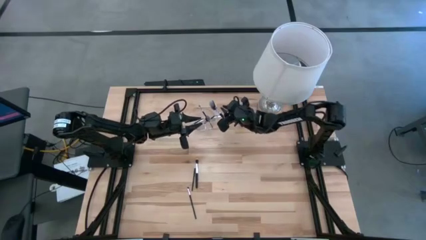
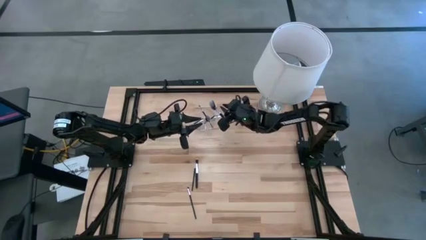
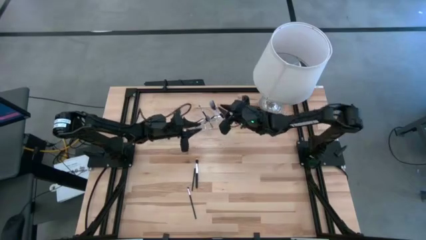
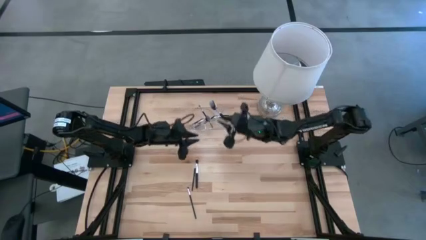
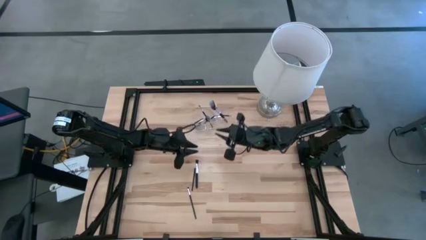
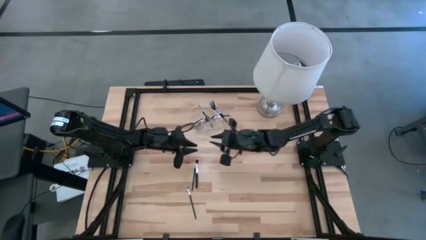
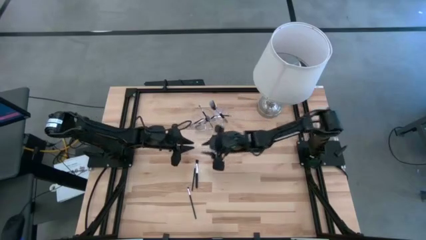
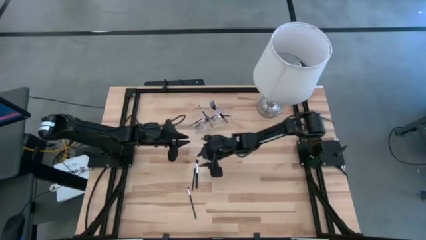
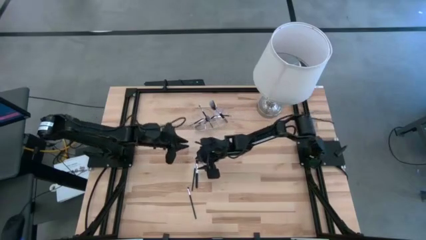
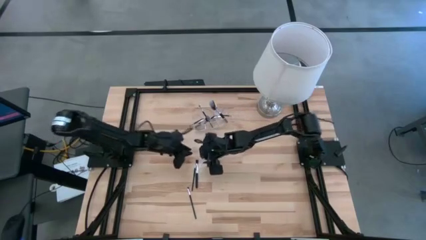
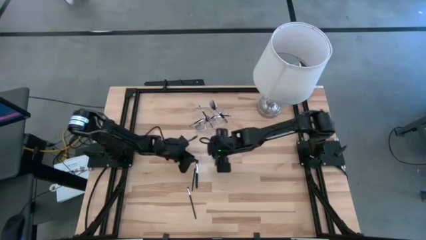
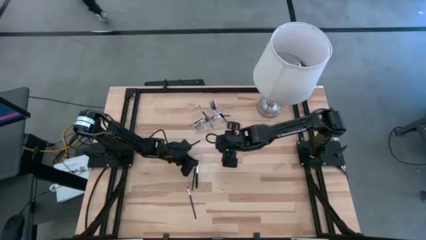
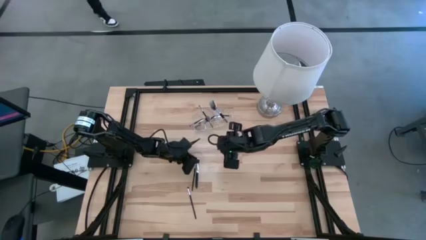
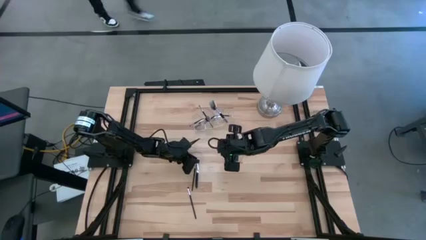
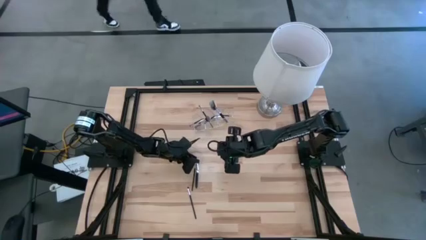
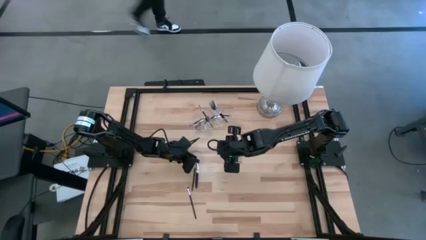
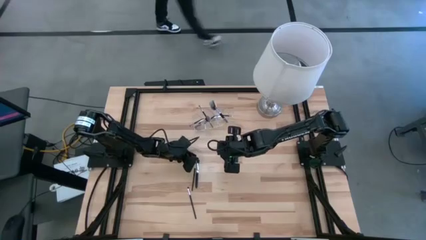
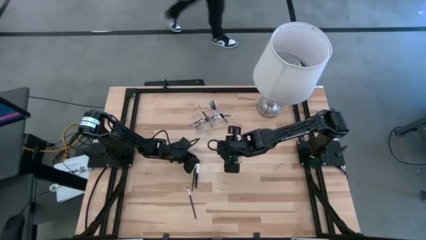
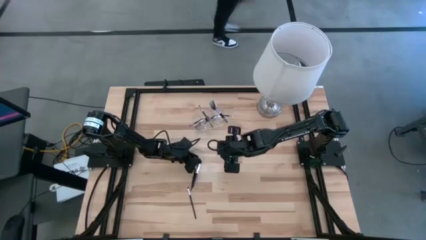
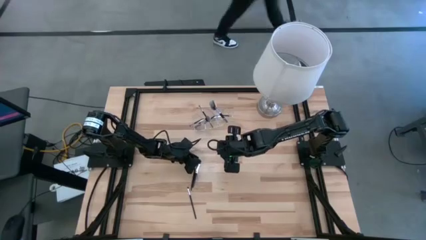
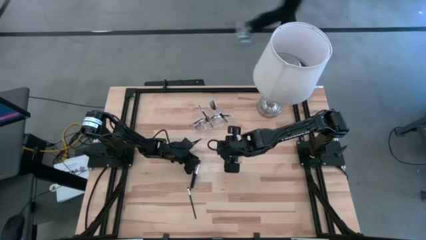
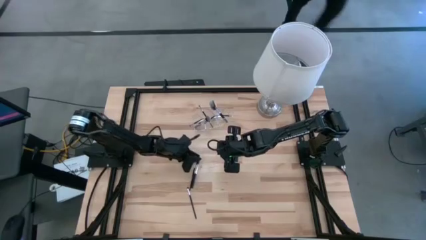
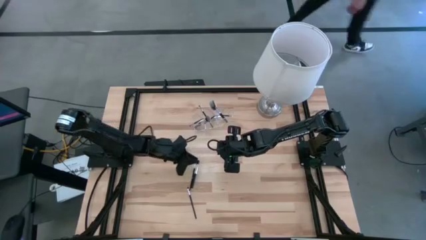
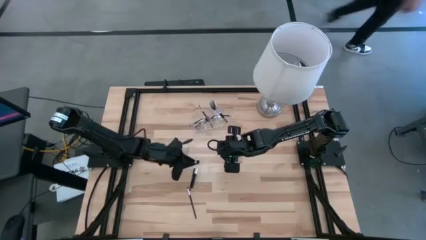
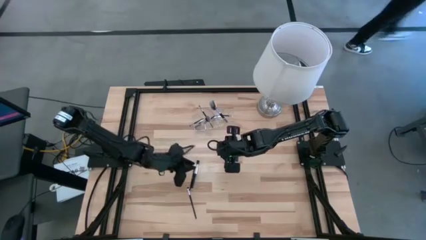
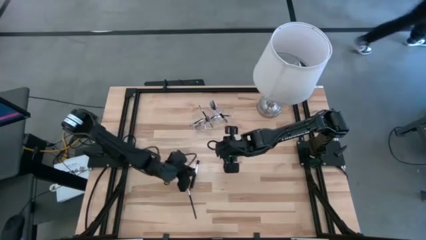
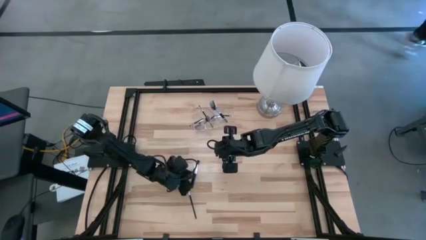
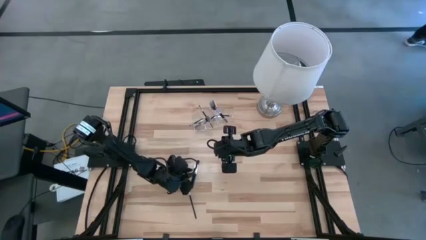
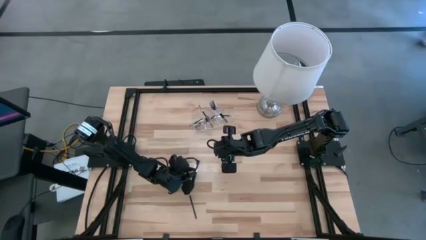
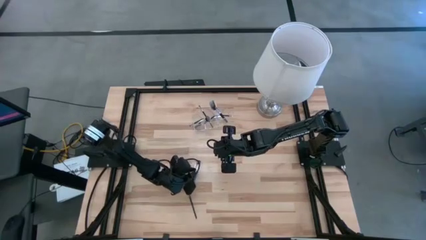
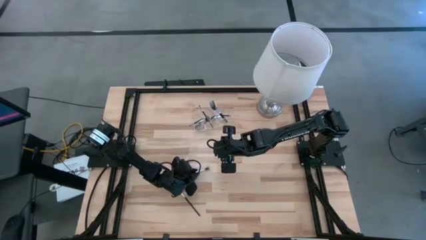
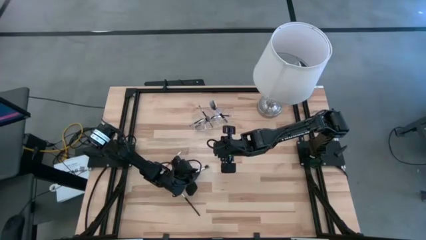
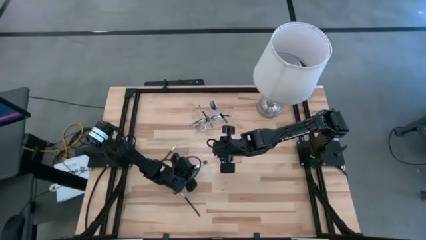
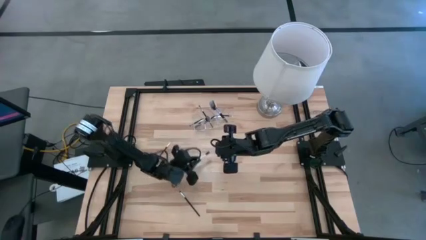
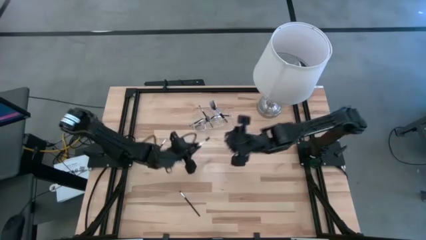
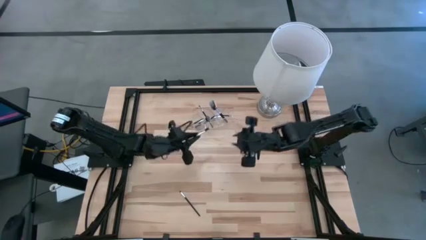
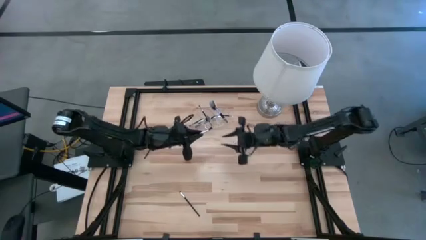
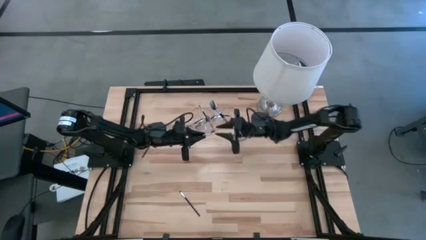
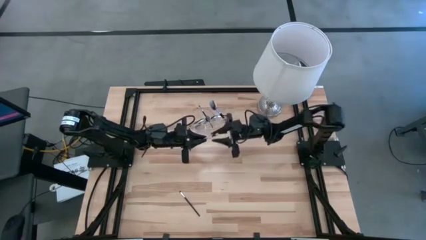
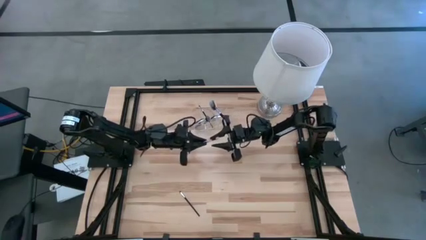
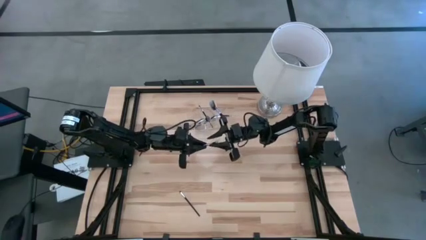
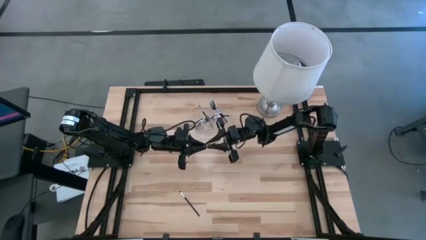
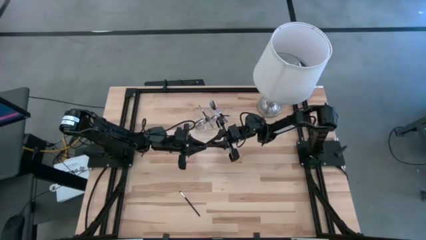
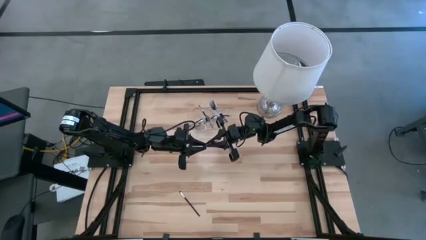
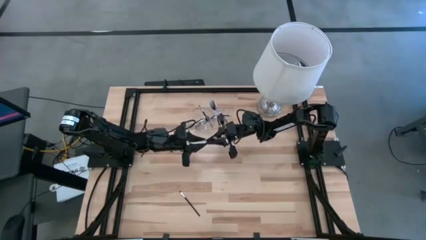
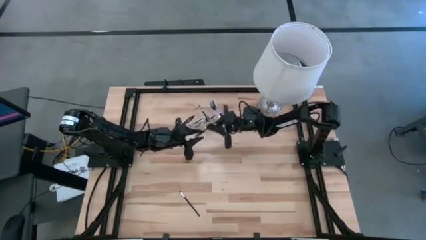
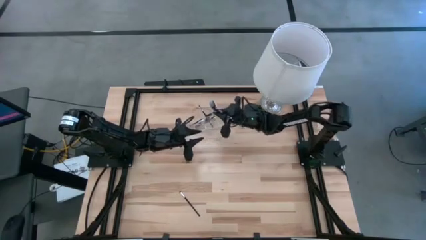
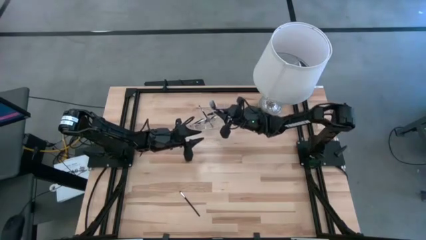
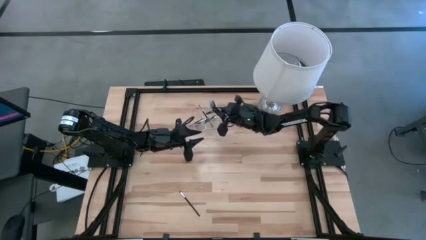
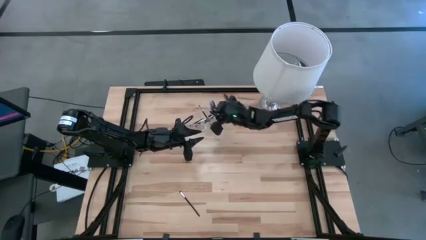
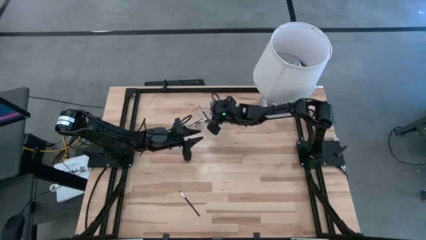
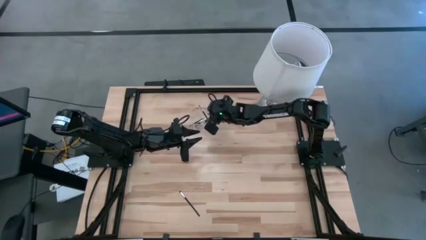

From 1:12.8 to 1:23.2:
Task: Sort items
Put the powder brush into the transparent organizer

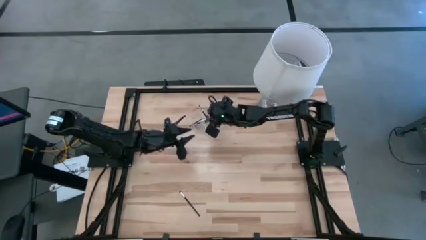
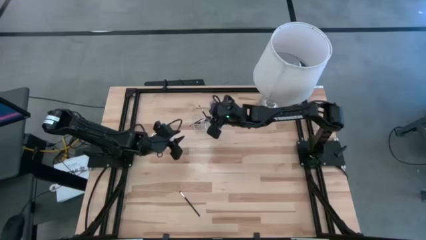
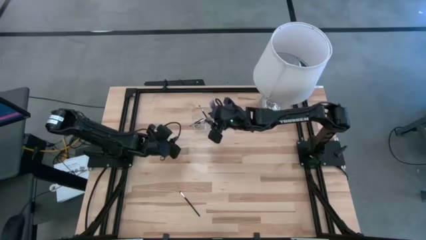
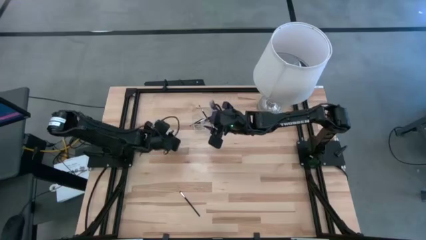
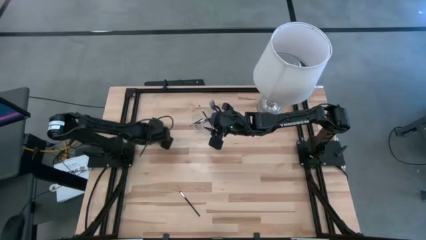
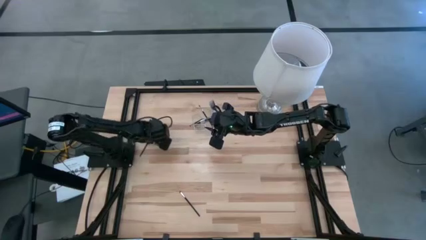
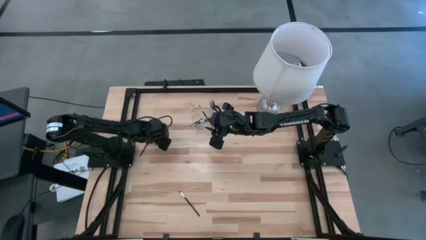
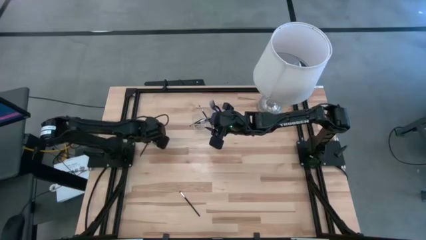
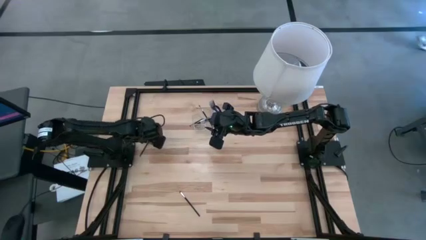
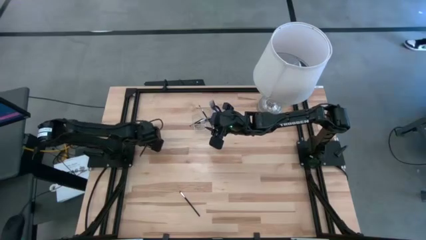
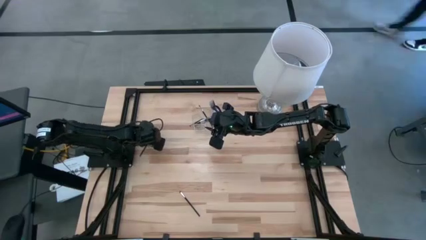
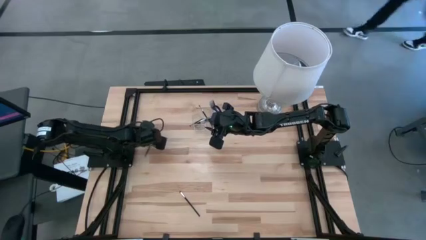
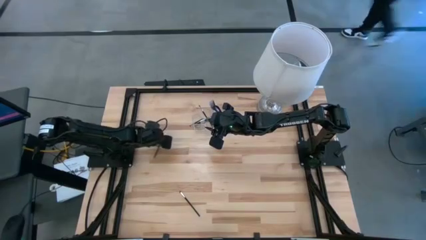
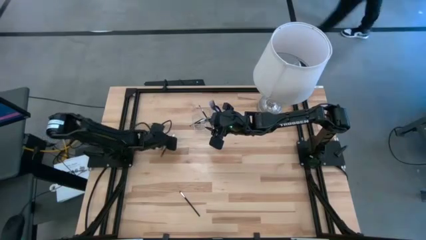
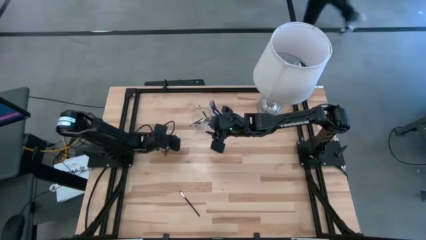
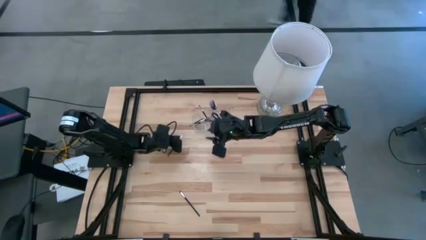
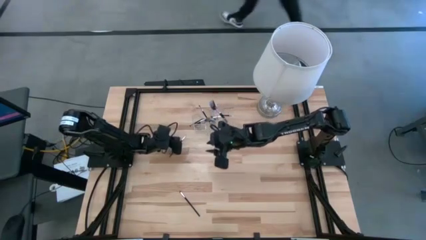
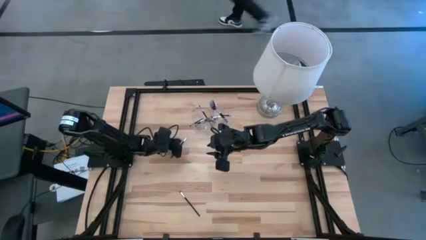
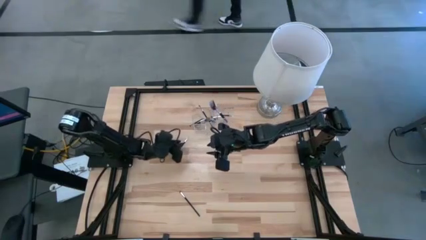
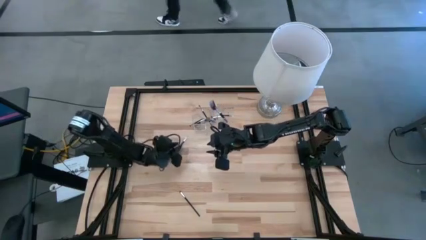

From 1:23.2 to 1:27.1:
Put the liner brush into the transparent organizer

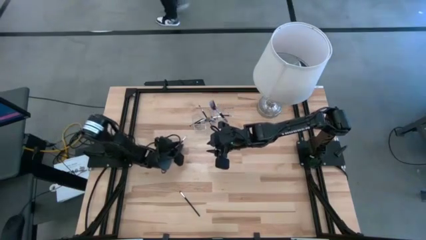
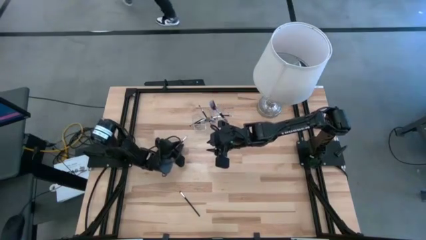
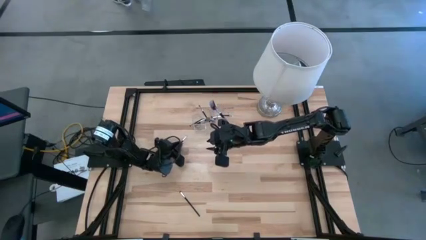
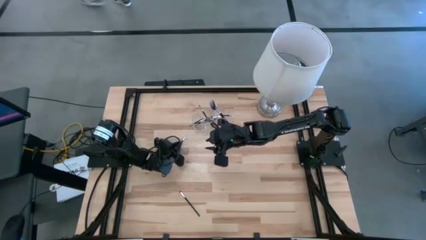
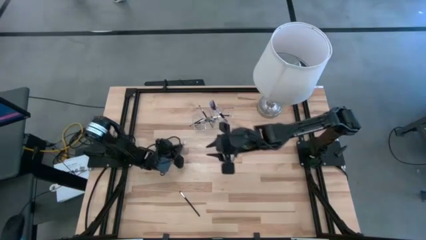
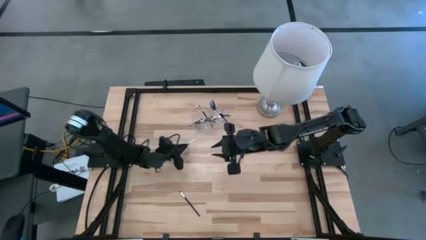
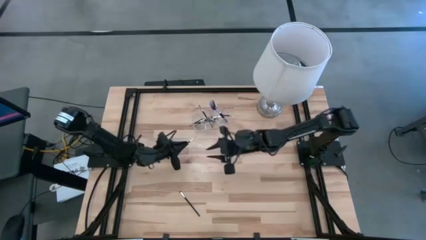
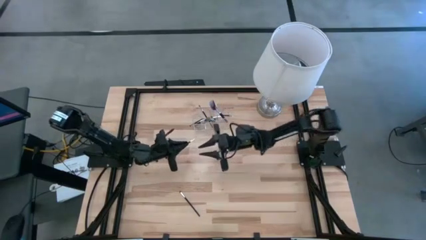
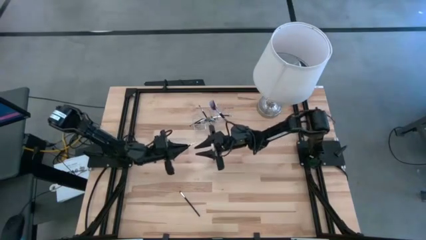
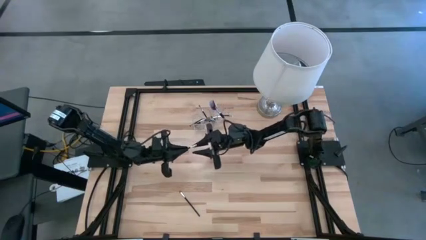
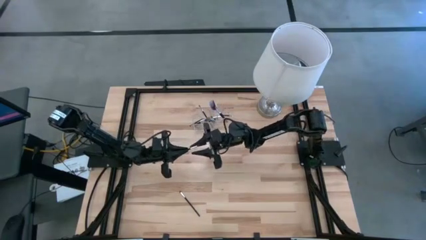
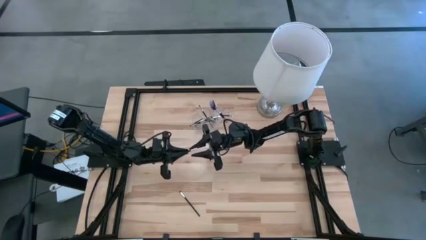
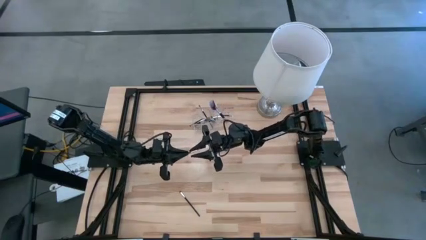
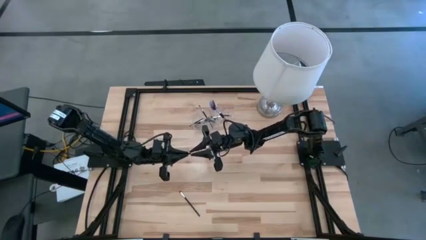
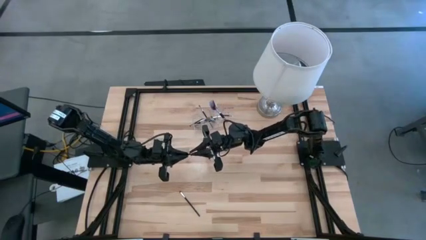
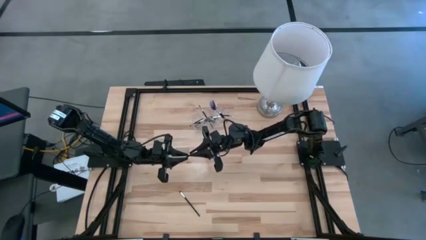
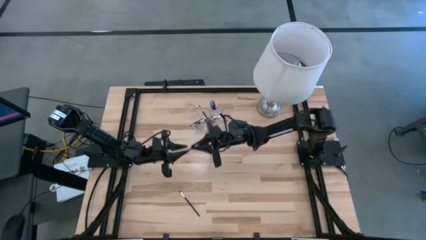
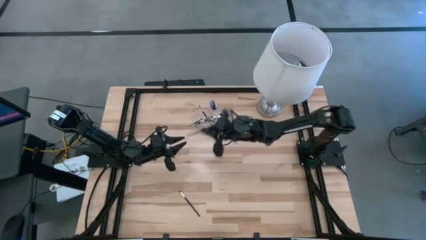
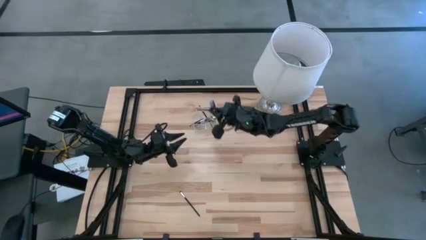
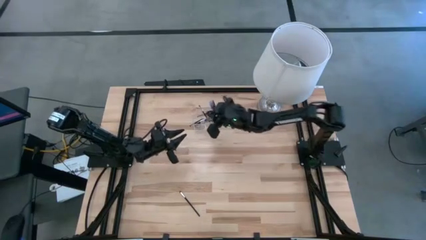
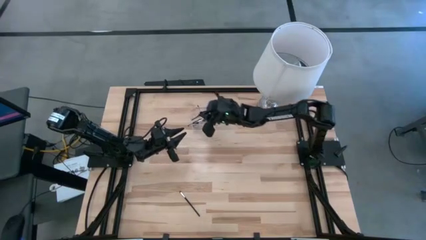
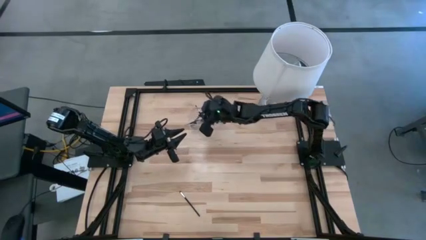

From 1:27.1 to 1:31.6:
Put the liner brush into the transparent organizer
